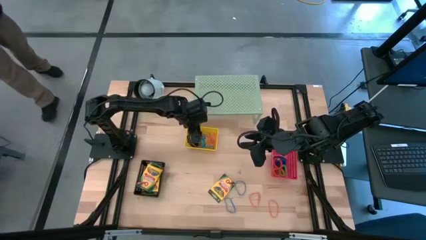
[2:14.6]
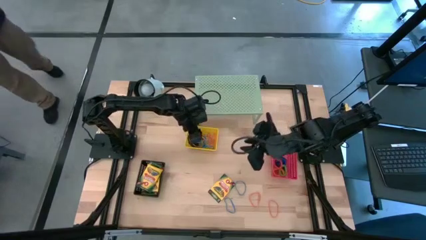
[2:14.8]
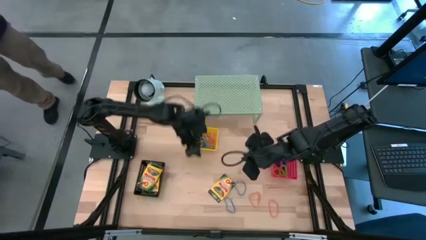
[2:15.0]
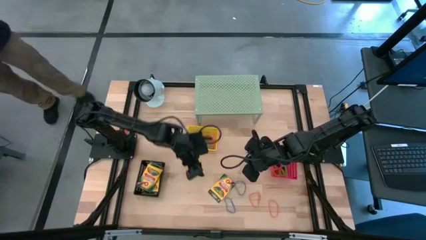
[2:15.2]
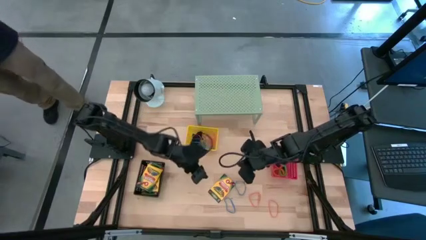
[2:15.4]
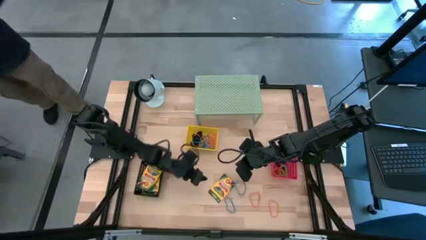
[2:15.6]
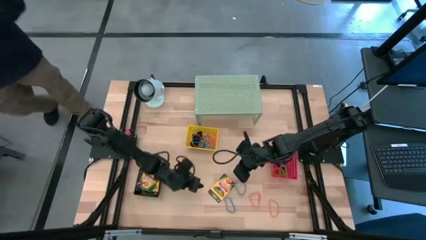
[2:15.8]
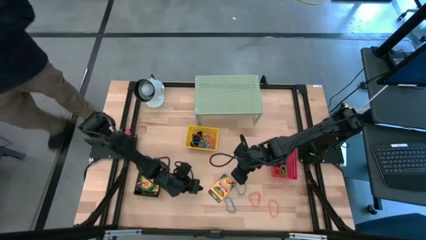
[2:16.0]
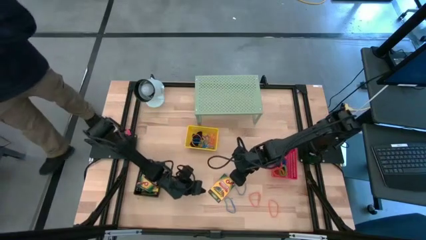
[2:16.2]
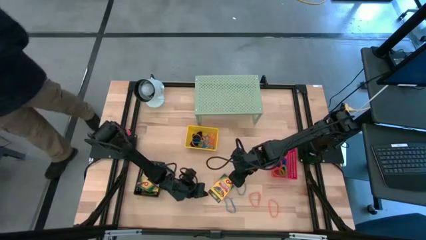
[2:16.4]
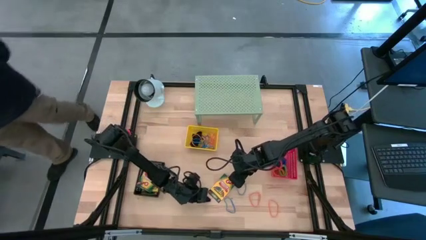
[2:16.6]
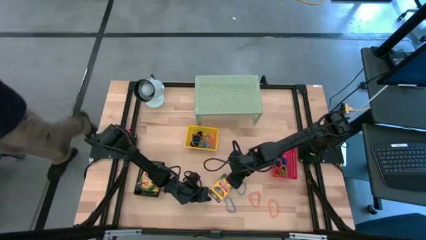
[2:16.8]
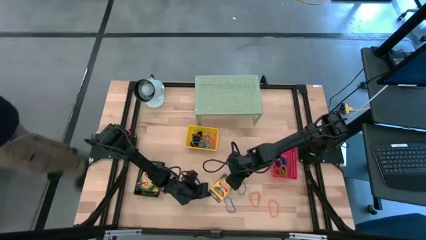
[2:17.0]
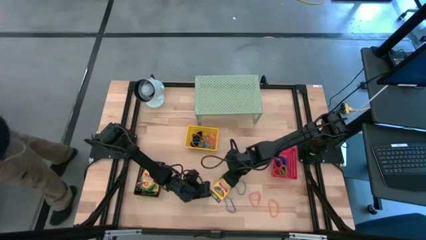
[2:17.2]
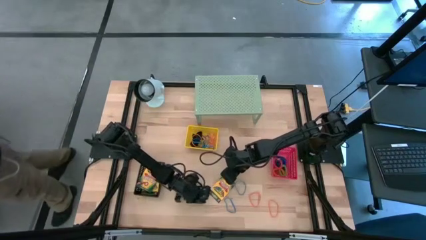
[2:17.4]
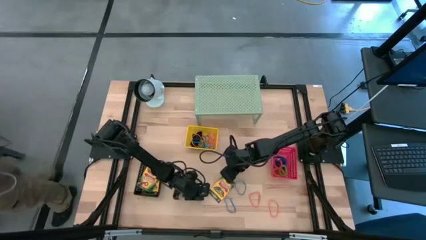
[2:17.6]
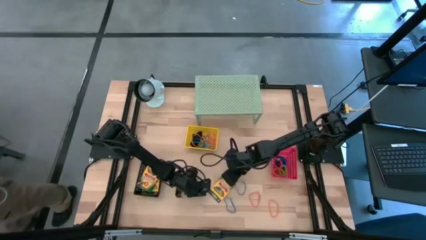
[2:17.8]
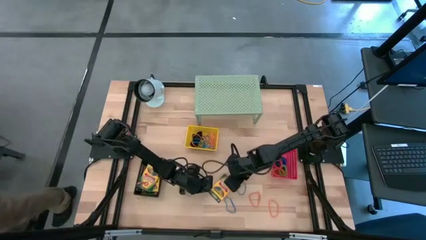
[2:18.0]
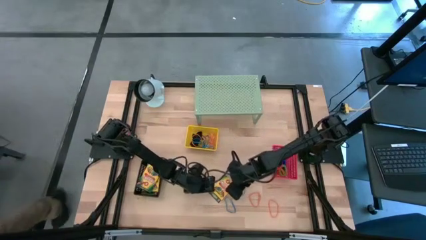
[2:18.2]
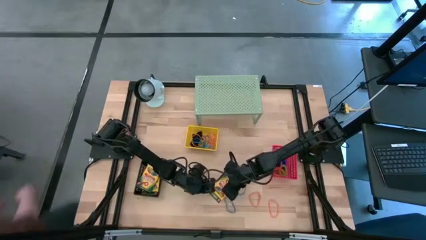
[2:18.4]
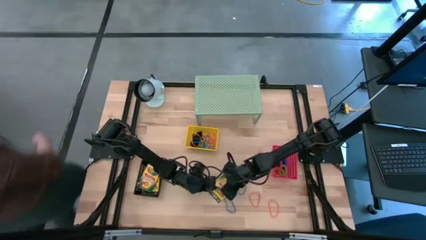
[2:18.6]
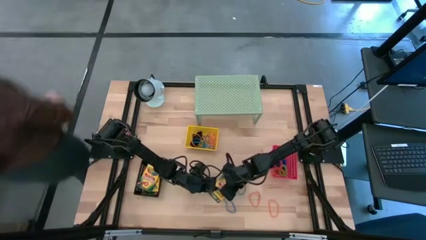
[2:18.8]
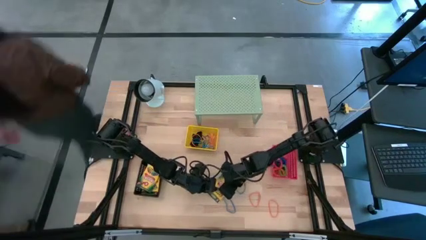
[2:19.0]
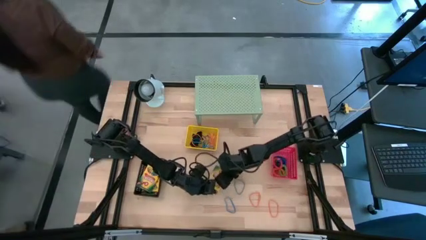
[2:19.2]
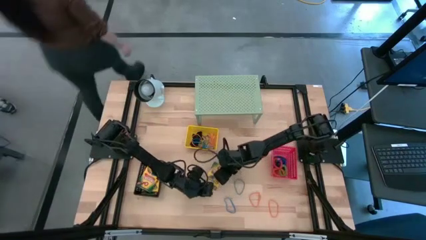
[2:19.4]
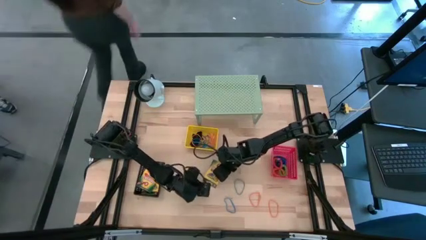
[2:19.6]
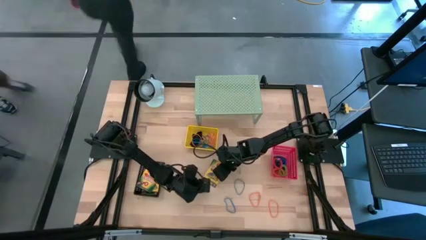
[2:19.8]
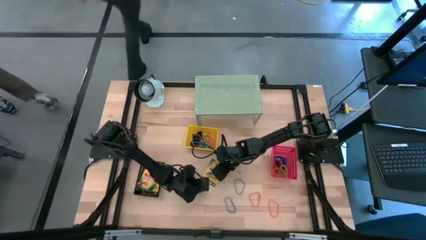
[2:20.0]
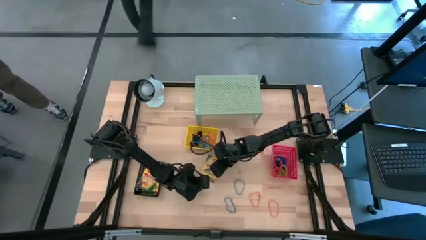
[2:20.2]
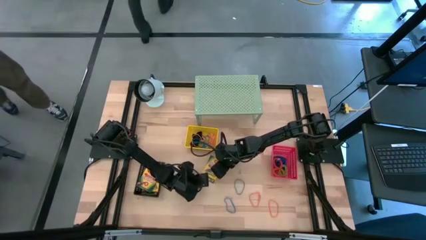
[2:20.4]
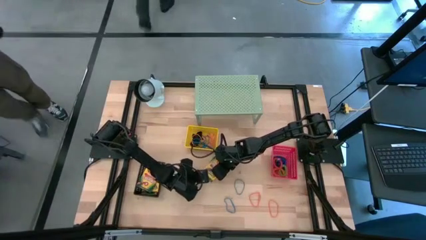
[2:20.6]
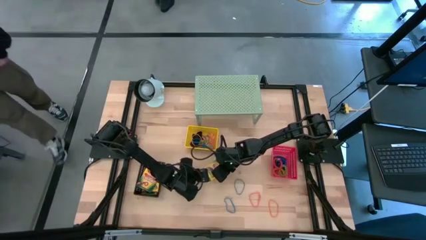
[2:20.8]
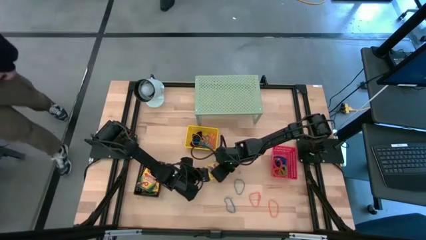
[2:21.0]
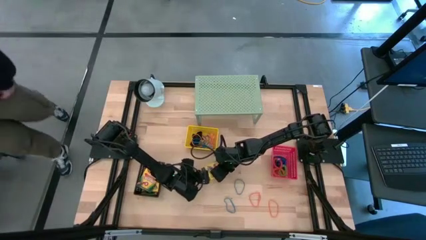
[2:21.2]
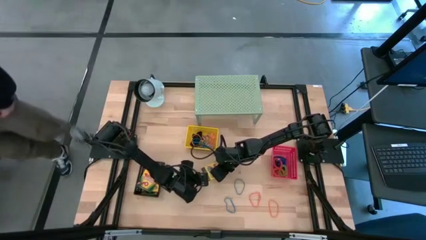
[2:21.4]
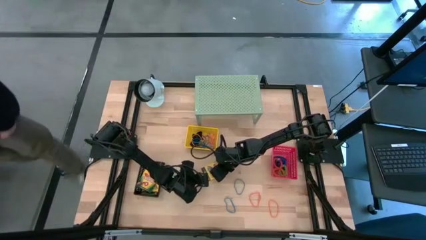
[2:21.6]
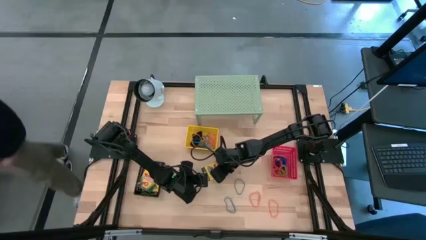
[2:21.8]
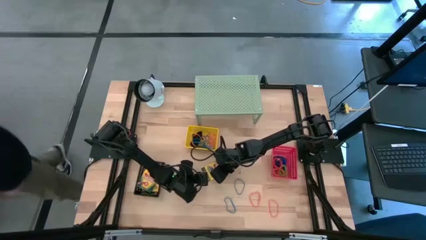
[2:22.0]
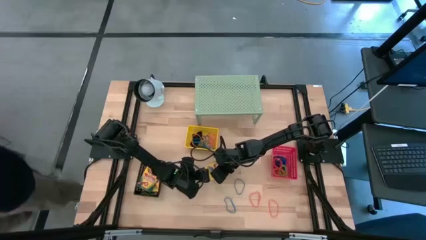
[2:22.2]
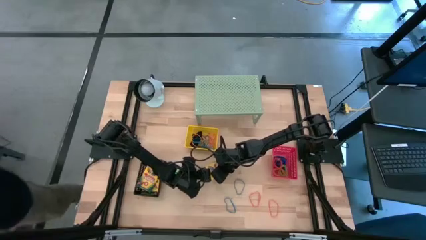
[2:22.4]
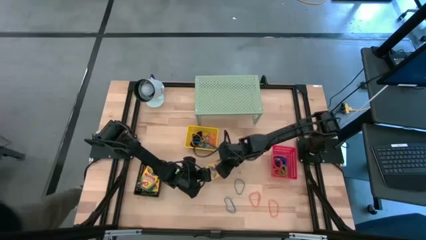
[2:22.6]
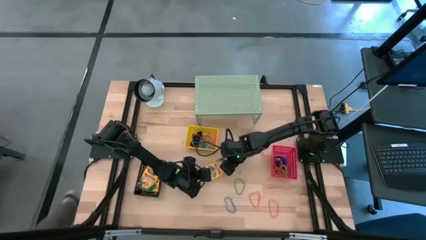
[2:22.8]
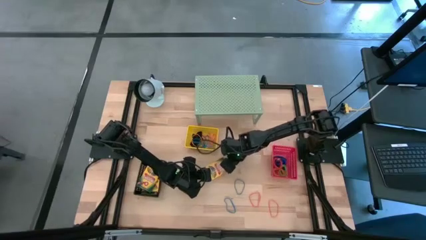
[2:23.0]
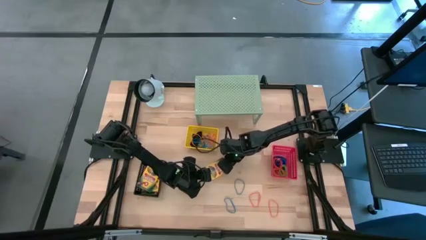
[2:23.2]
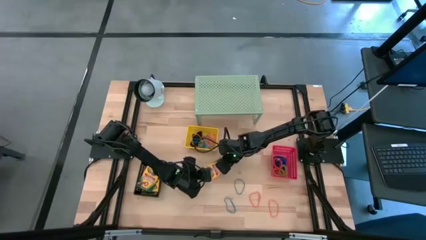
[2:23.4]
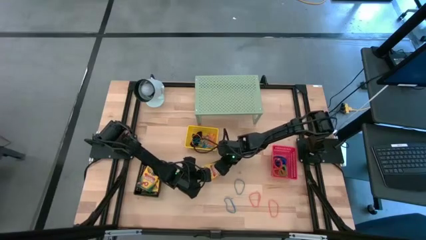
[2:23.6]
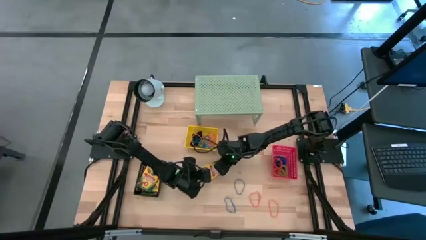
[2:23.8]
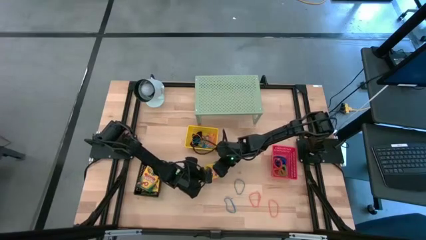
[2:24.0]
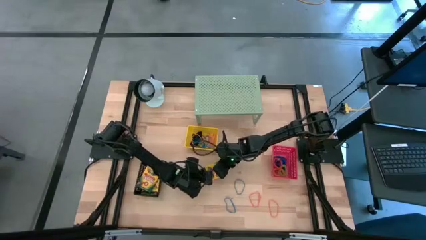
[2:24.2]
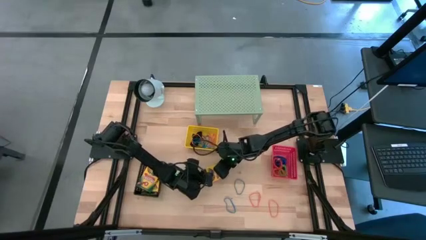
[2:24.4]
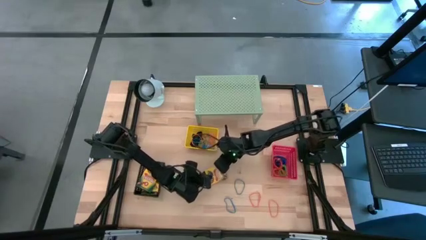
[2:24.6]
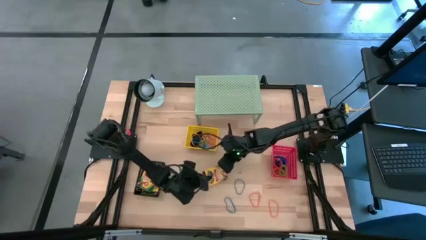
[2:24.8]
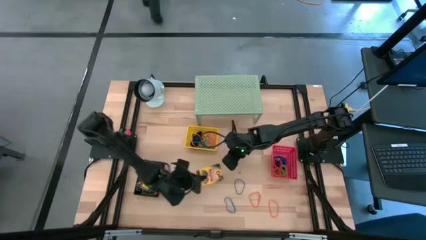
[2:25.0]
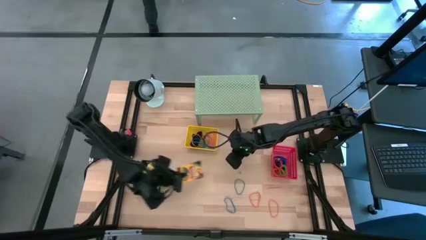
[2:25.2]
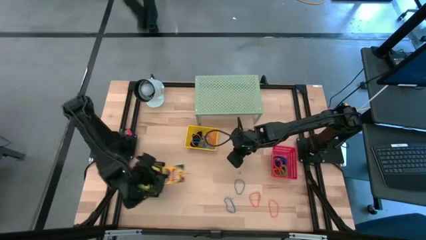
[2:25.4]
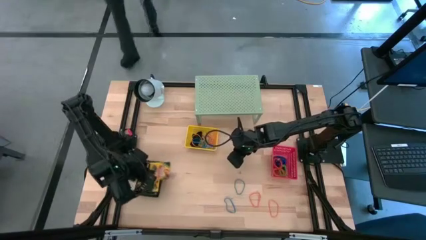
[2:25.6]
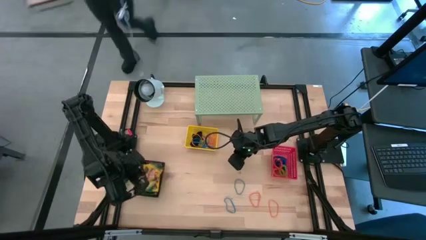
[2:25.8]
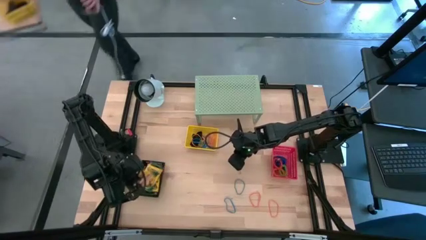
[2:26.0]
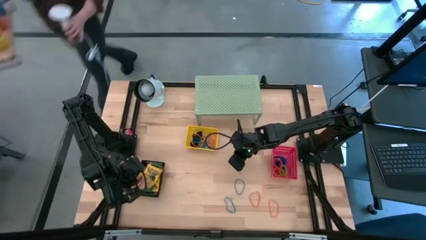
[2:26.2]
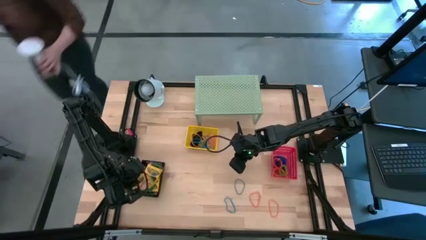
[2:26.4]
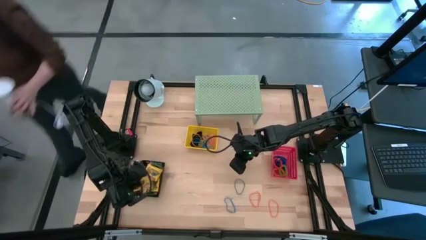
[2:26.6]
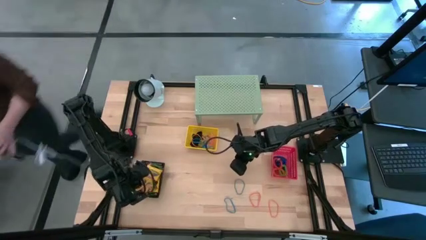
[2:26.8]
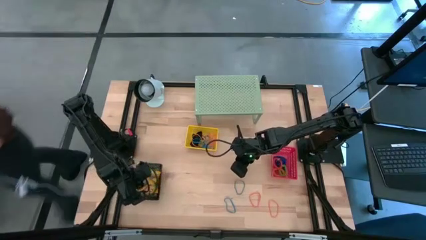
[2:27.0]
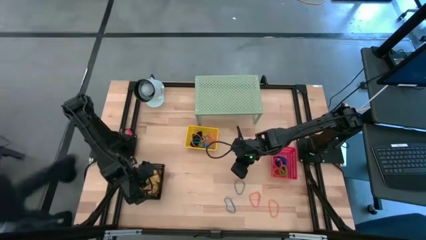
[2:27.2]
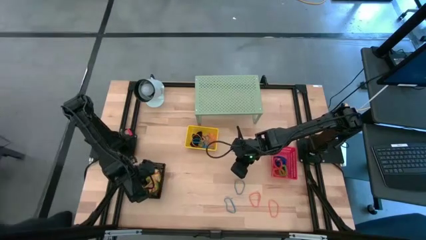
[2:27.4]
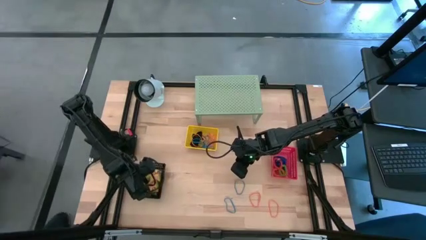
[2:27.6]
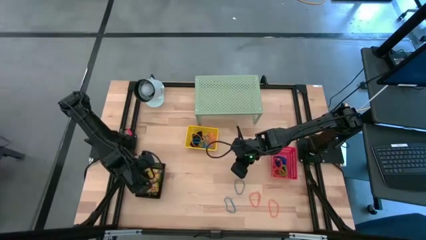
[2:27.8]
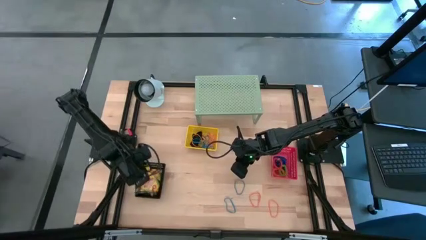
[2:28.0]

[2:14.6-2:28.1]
Task: Pick & Place Office Desk Supplies
Put the crayon box into the black bin

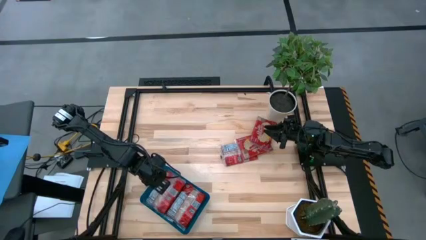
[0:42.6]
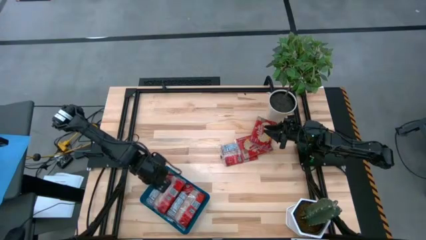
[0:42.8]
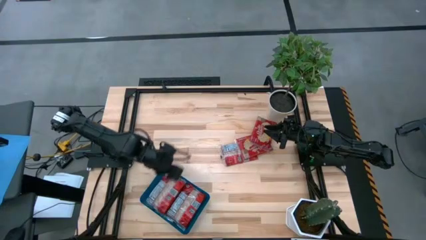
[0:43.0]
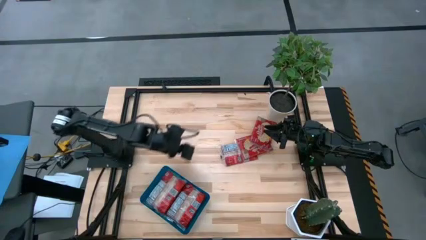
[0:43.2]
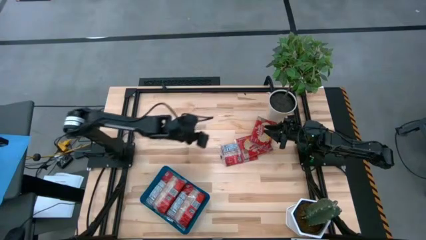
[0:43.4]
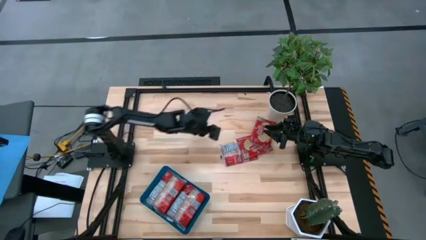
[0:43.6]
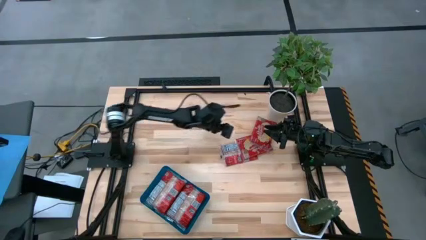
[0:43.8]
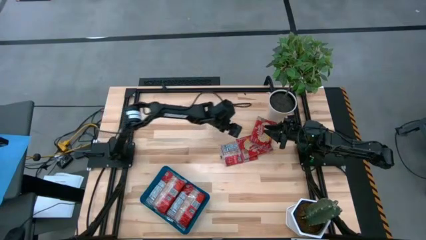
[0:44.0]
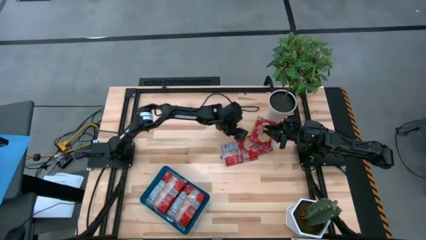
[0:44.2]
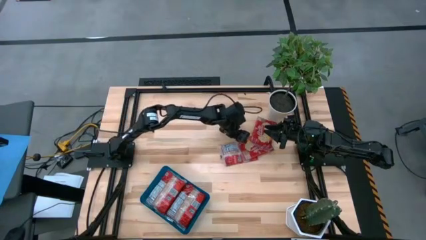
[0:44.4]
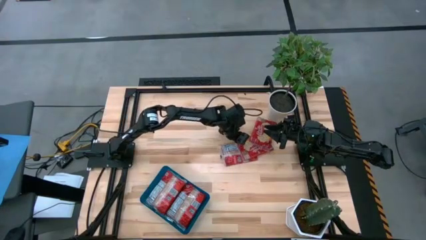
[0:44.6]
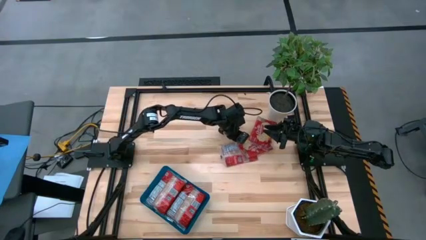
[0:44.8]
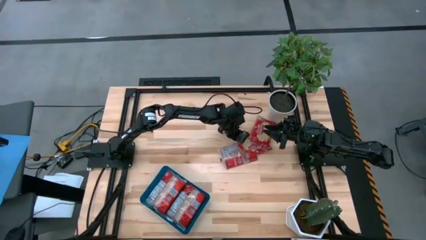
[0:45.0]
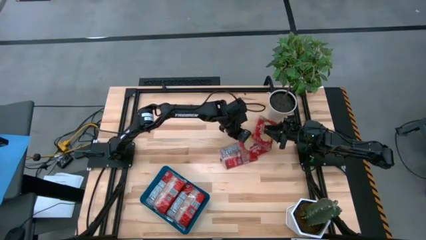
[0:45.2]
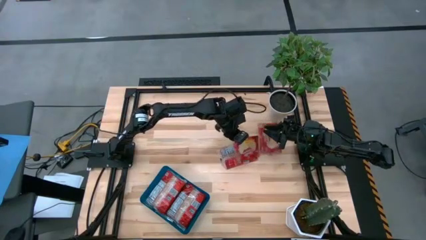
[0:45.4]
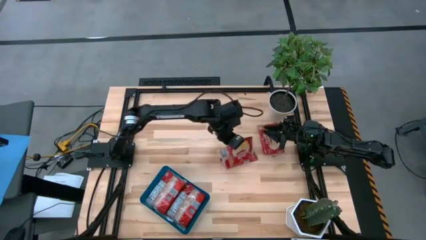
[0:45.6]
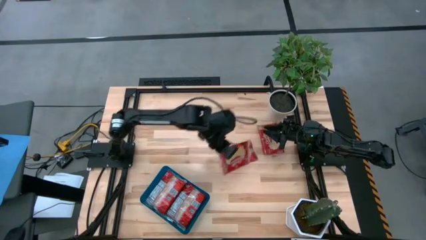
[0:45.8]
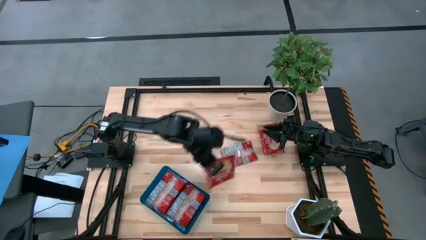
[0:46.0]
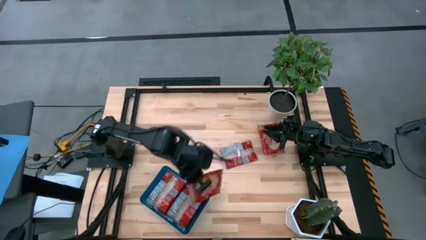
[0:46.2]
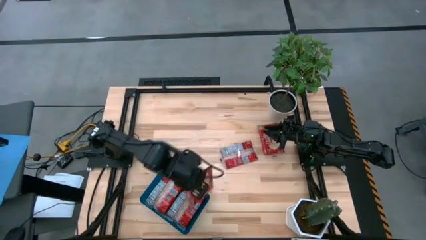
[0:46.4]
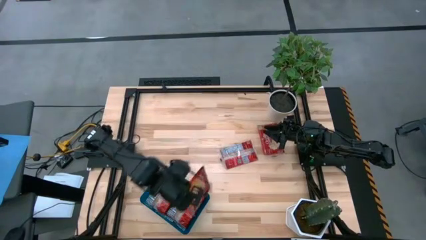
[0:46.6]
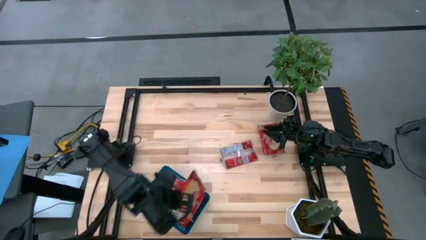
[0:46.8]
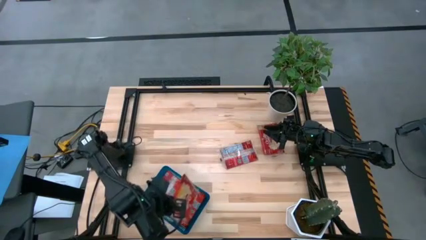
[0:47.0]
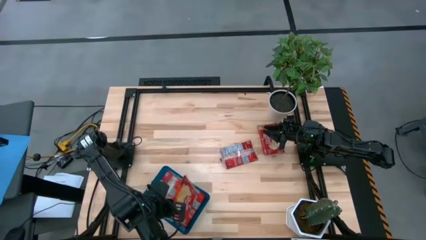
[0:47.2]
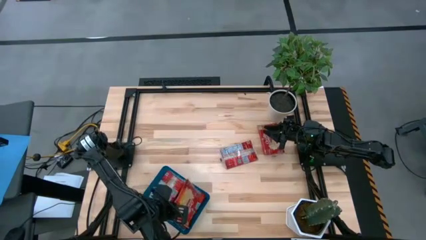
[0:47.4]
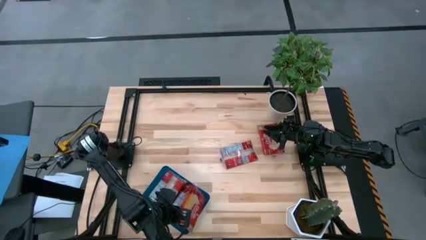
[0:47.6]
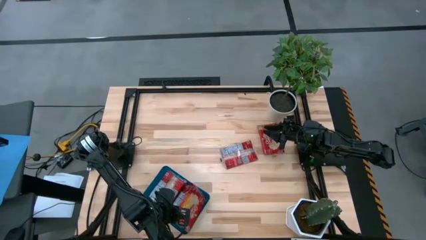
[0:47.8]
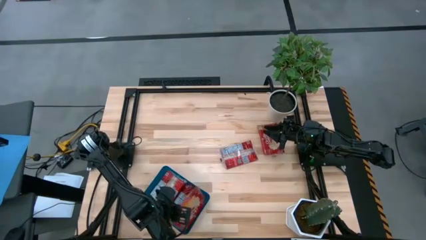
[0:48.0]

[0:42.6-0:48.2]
Task: Sort popcorn bags into baskets
Put the red popcorn bag into the blue bin
